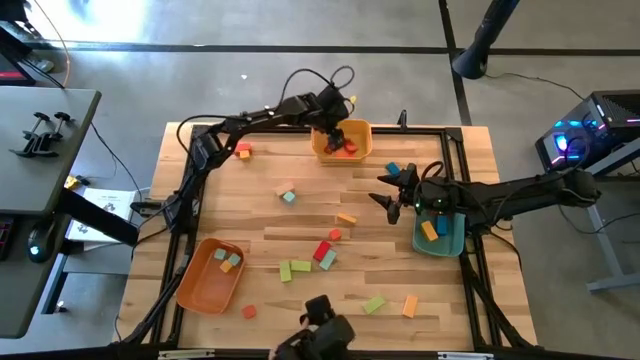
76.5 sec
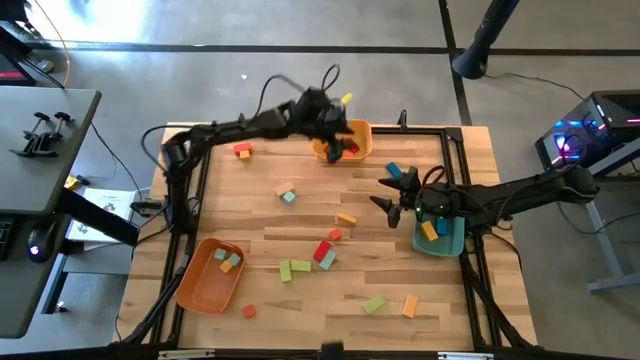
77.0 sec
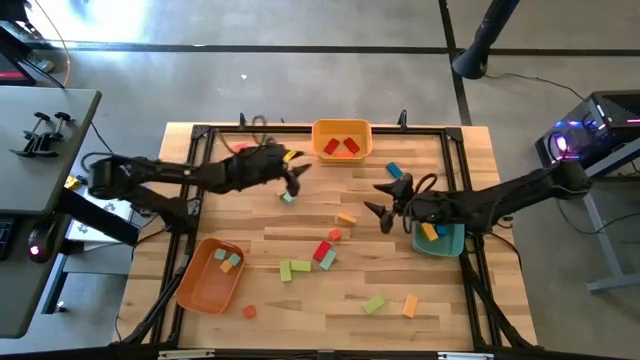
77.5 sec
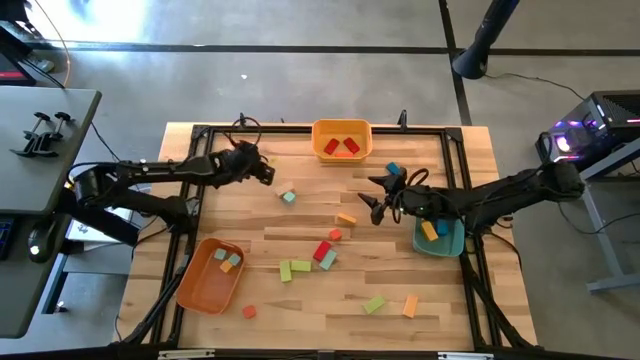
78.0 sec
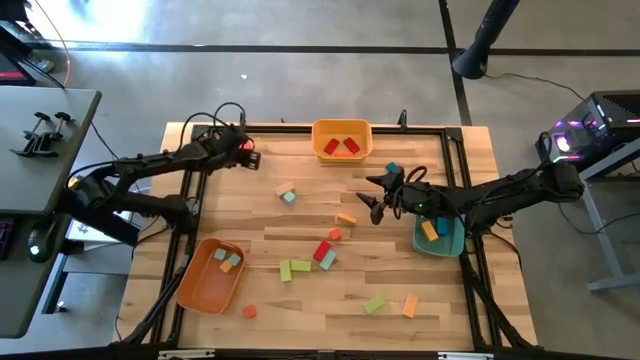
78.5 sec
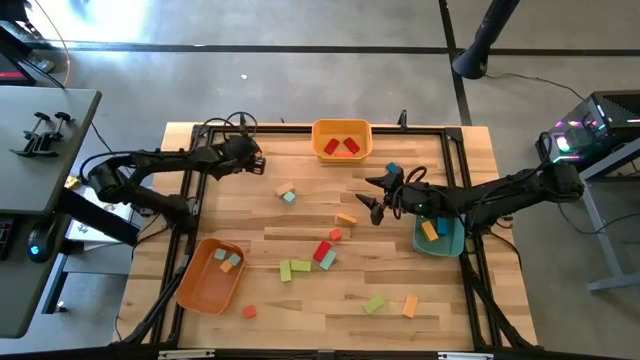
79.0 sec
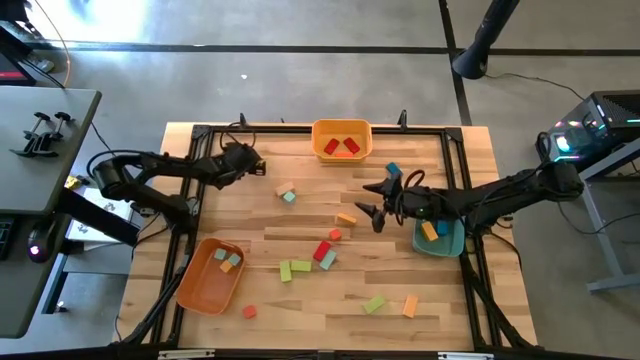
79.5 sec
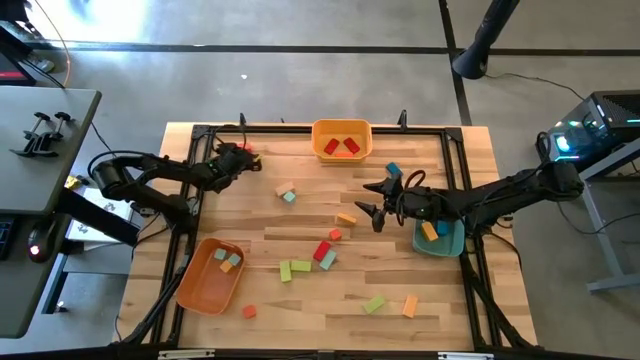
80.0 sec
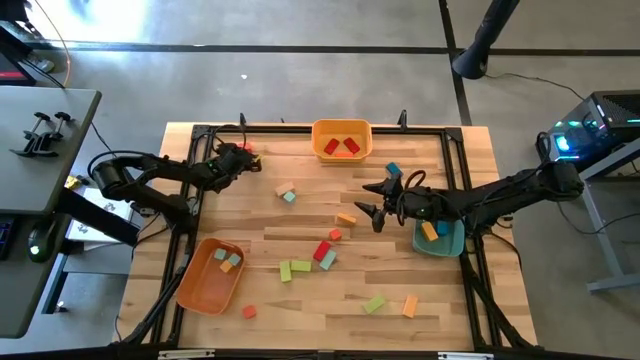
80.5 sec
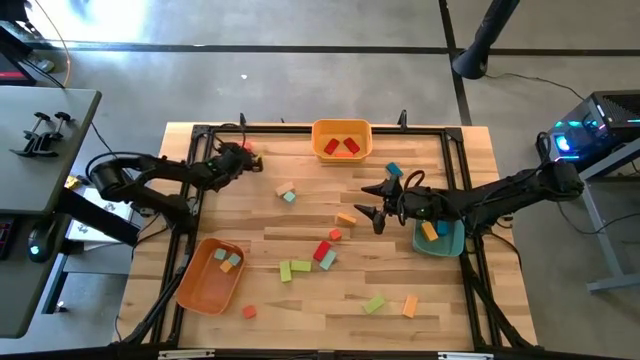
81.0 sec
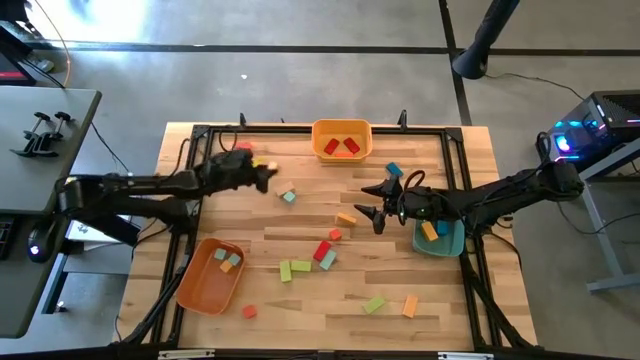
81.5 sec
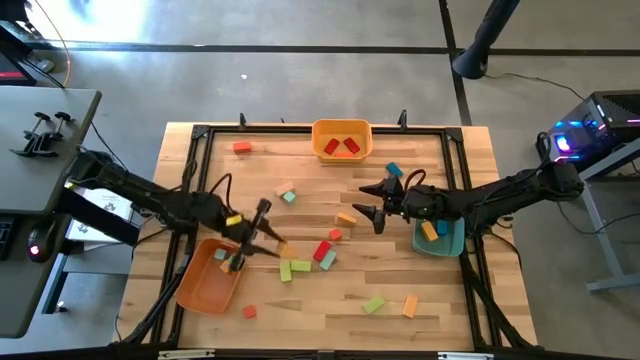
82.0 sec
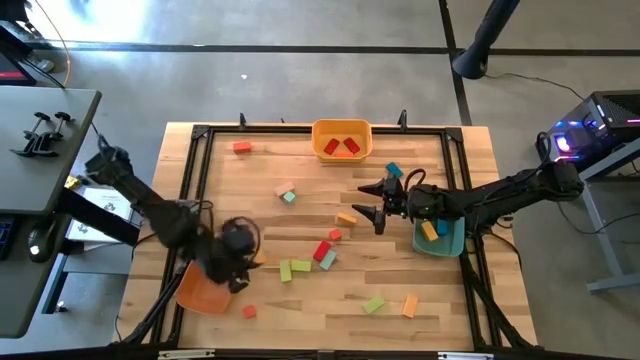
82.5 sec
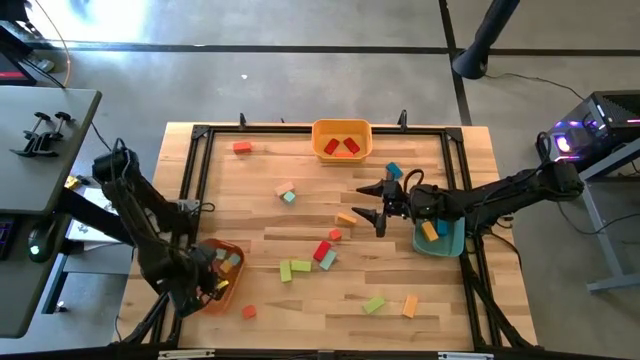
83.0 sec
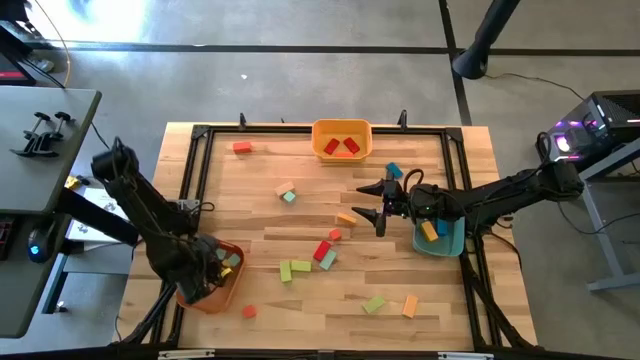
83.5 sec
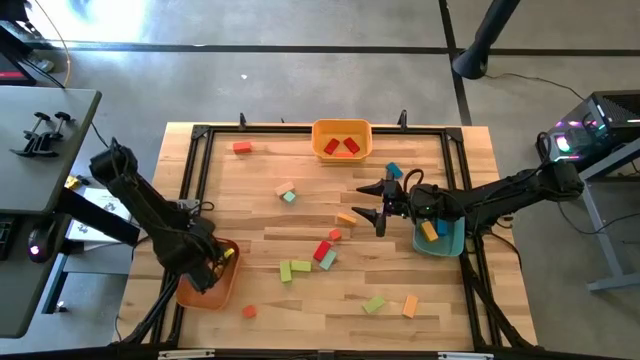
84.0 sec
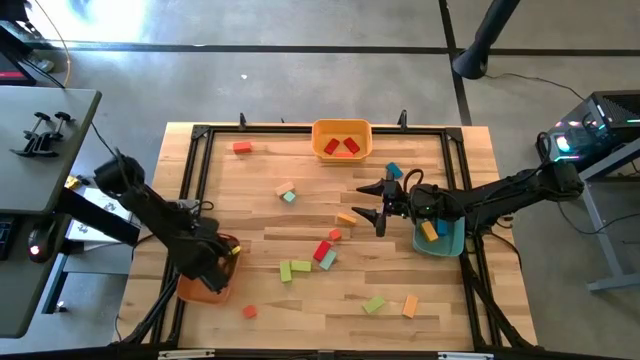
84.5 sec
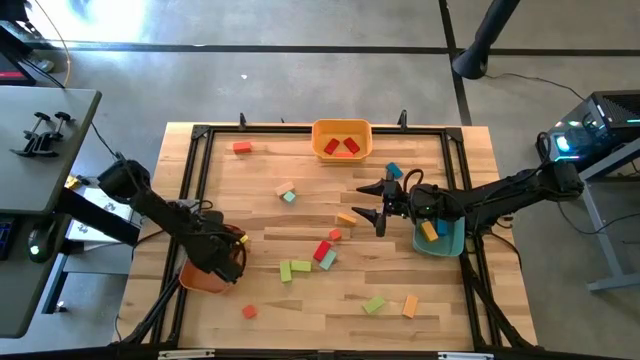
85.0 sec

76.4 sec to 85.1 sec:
Task: Sort blocks by size
Put the yellow square block into the orange bin

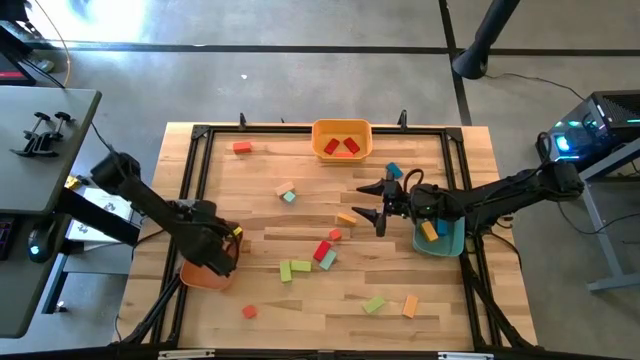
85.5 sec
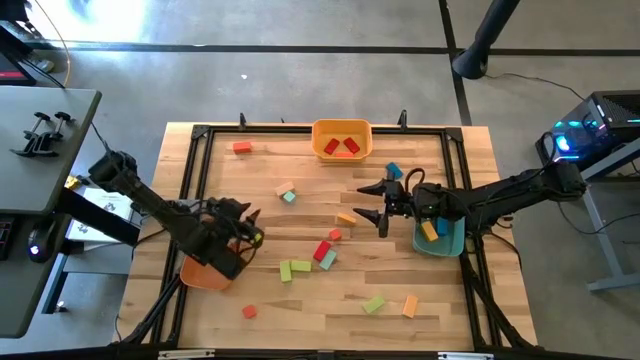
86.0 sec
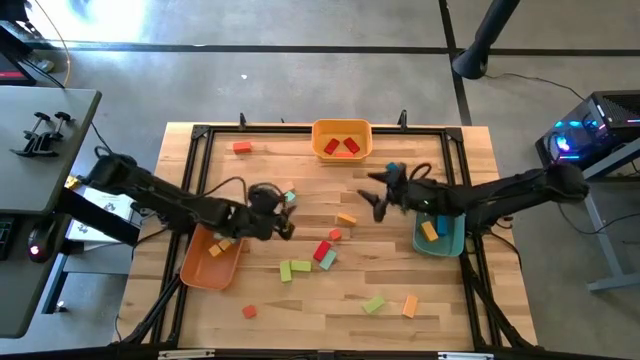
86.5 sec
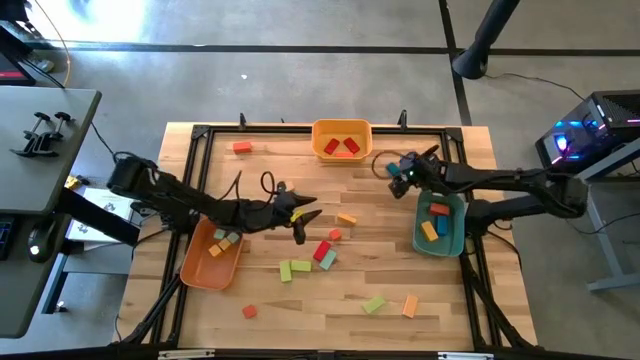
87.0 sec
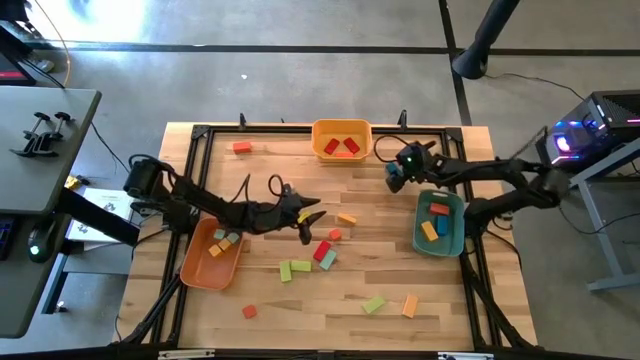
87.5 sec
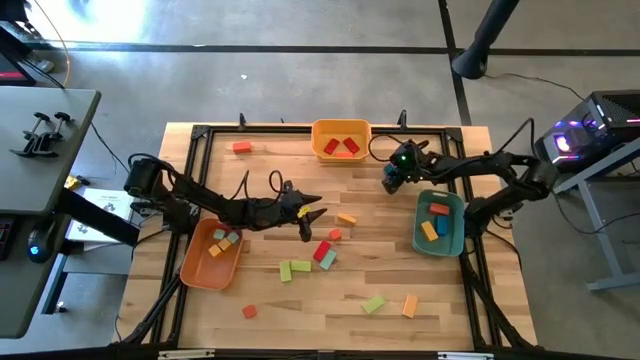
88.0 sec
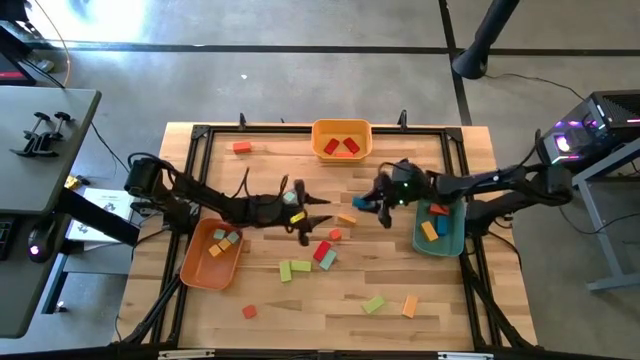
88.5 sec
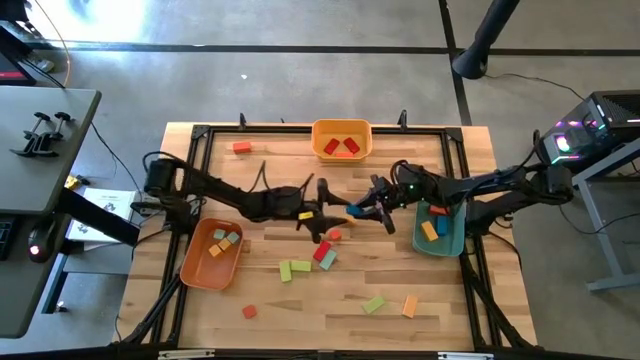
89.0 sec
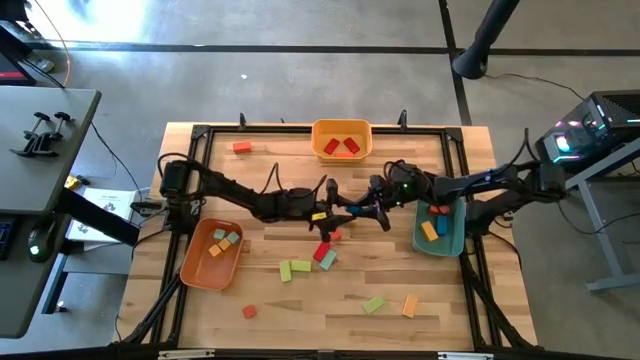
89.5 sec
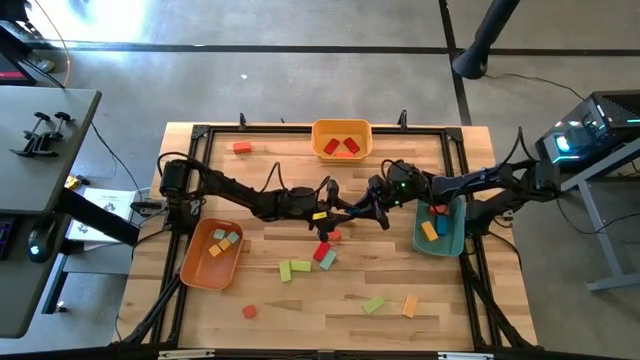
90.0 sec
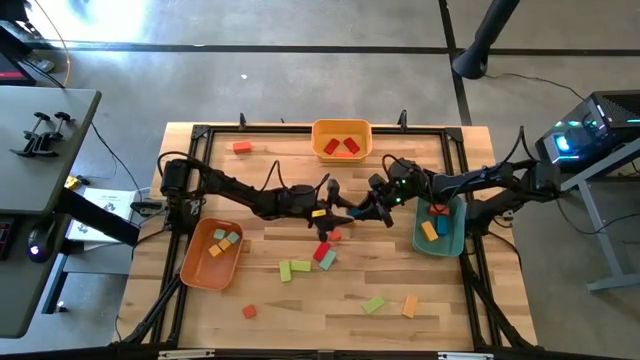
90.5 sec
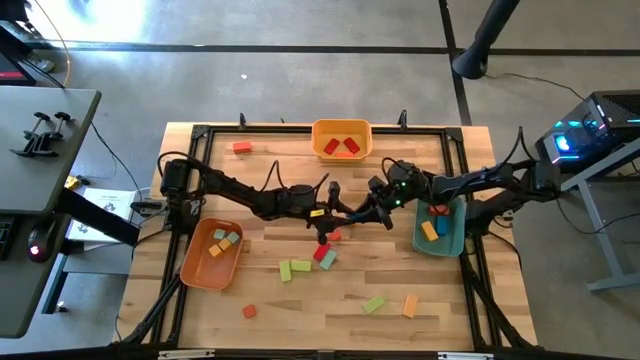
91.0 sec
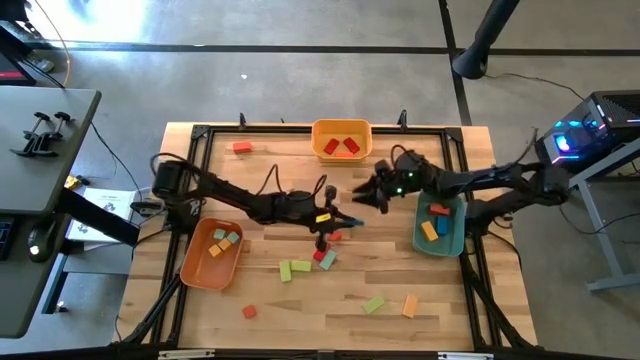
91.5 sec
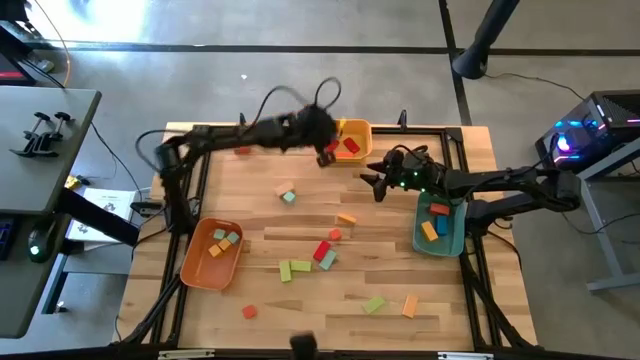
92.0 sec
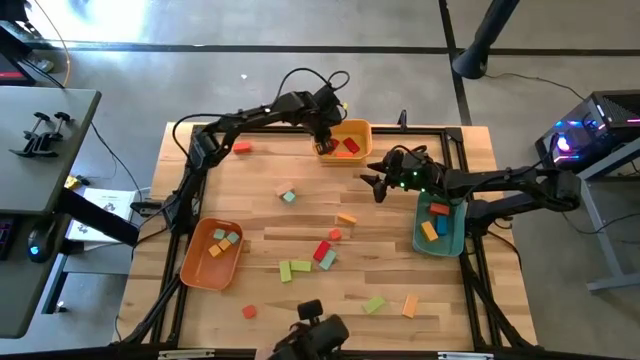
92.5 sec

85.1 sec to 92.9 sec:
Put the blue thin rectangular block into the yellow bin

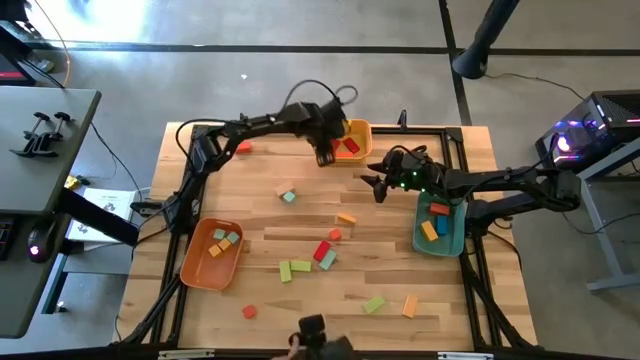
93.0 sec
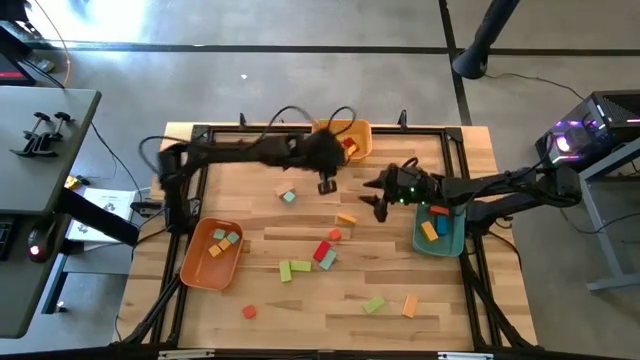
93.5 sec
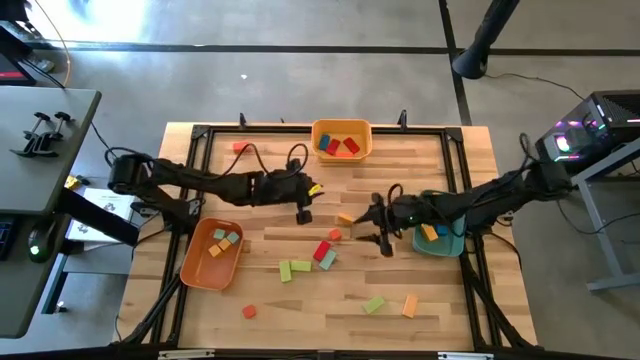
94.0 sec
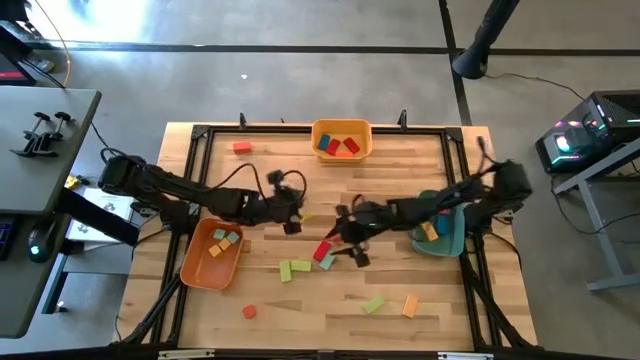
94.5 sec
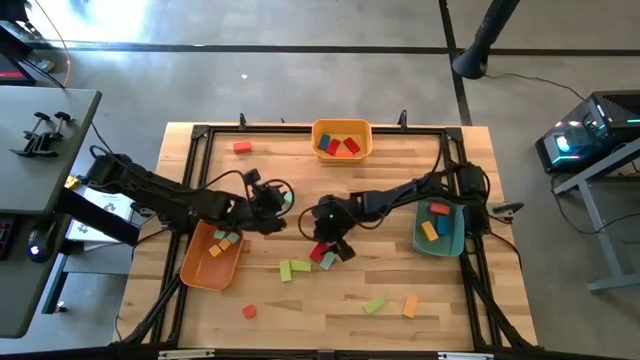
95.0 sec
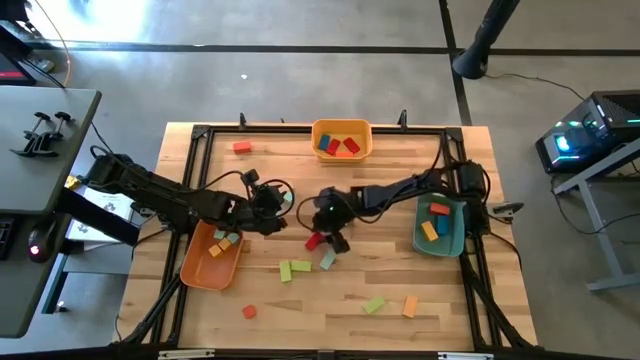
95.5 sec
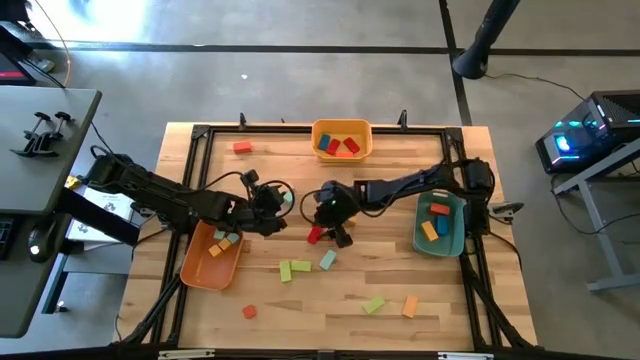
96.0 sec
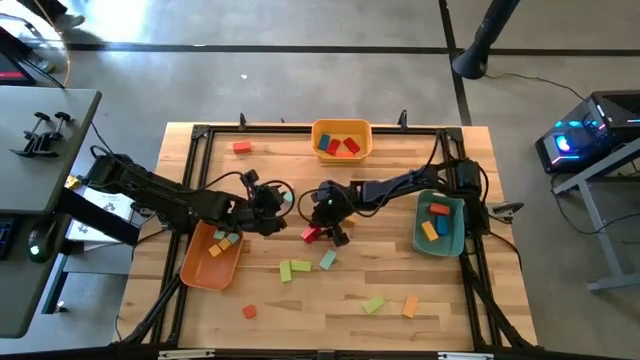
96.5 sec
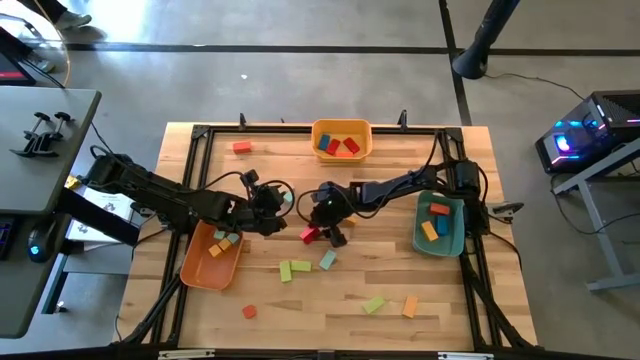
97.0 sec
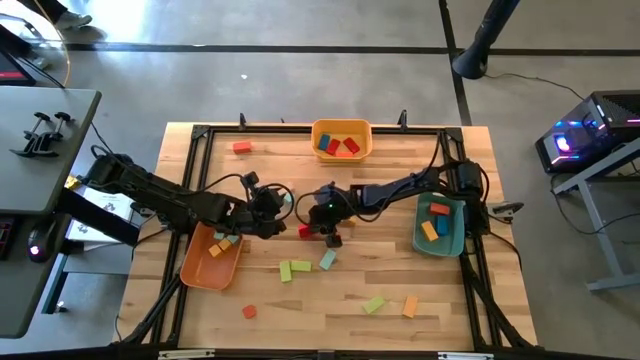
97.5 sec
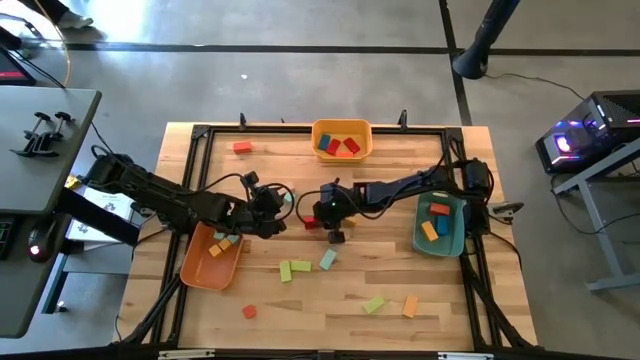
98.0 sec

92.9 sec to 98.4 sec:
Put the red thick rectangular block into the blue bin

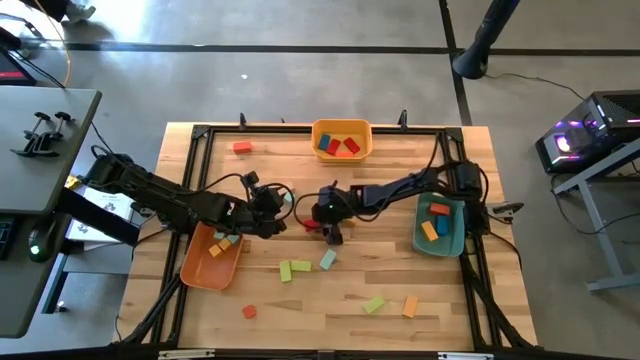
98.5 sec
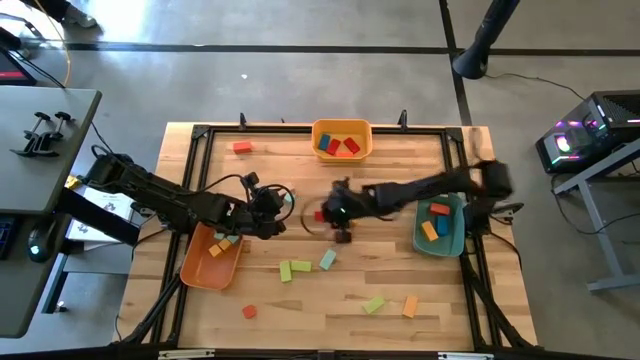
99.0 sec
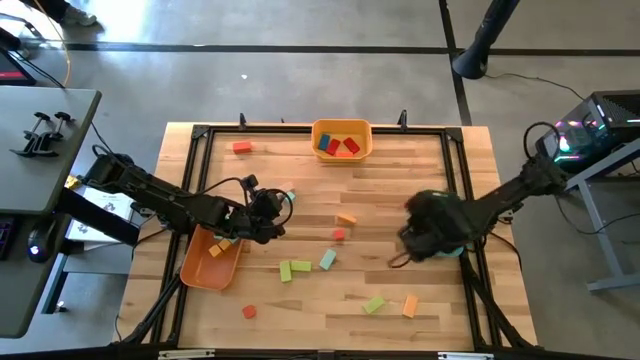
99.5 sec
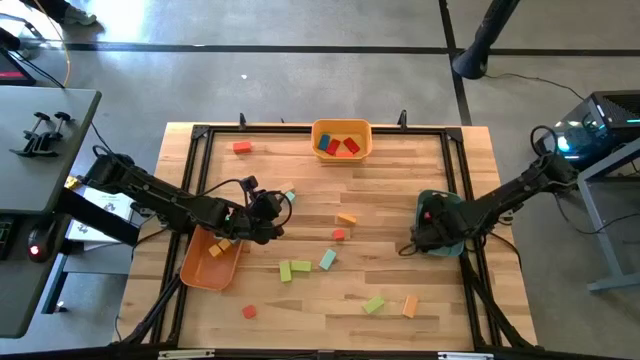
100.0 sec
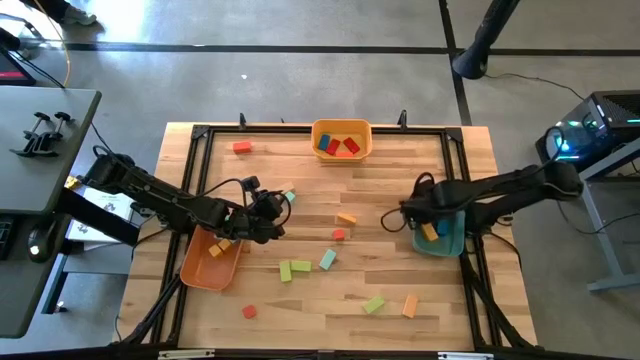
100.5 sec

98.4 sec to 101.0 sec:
Put the red thick rectangular block into the blue bin
